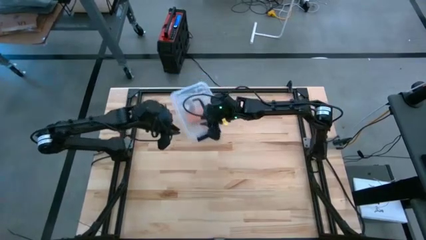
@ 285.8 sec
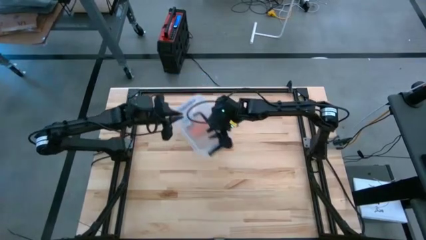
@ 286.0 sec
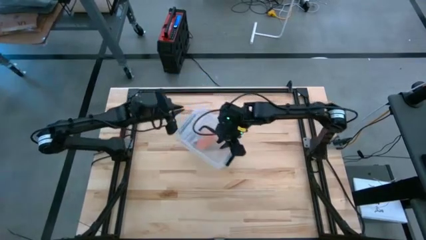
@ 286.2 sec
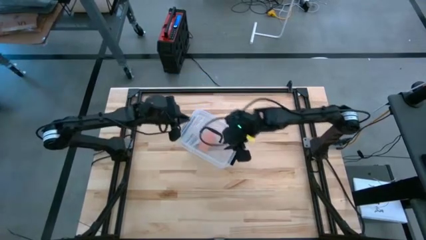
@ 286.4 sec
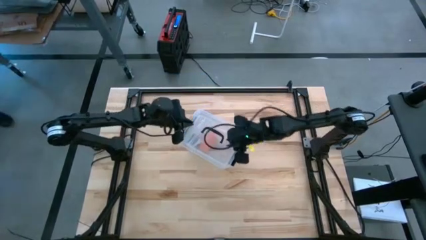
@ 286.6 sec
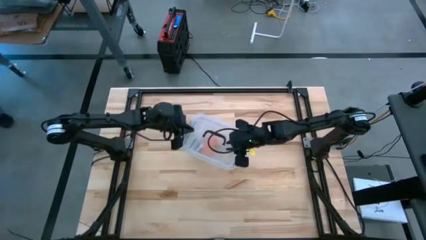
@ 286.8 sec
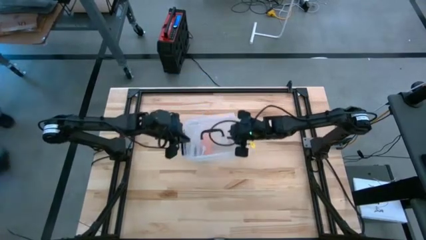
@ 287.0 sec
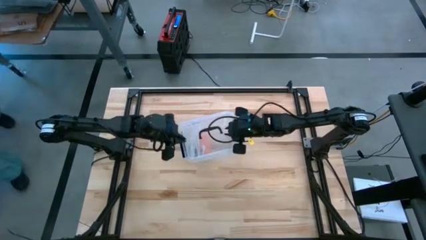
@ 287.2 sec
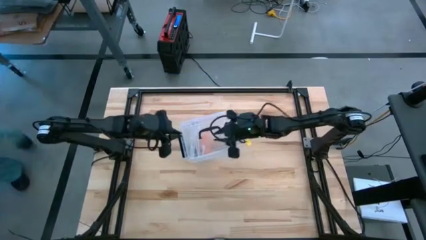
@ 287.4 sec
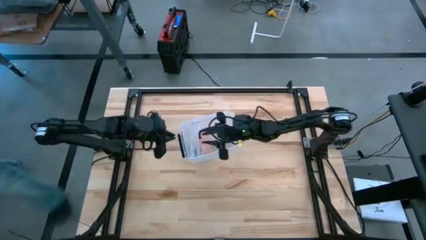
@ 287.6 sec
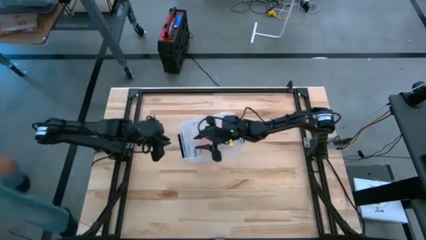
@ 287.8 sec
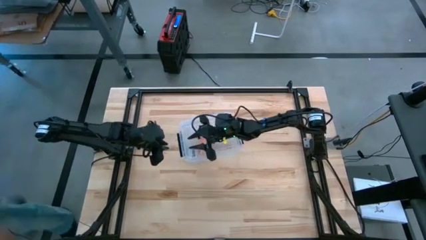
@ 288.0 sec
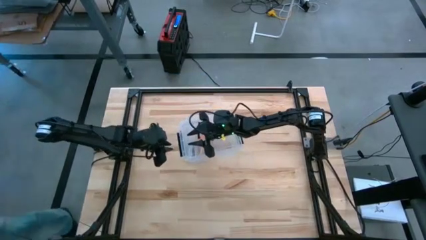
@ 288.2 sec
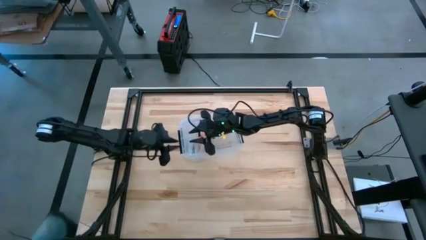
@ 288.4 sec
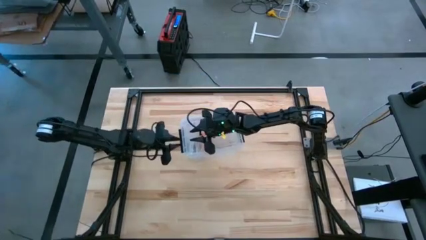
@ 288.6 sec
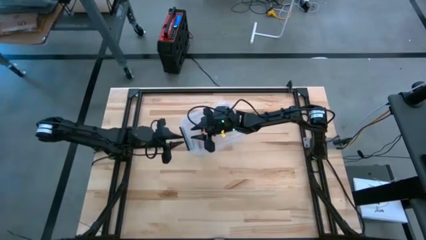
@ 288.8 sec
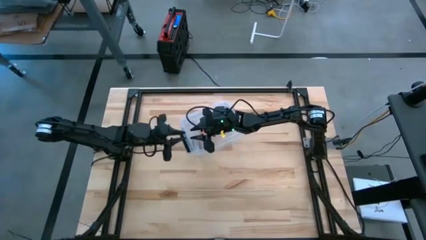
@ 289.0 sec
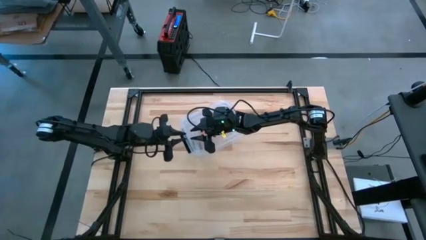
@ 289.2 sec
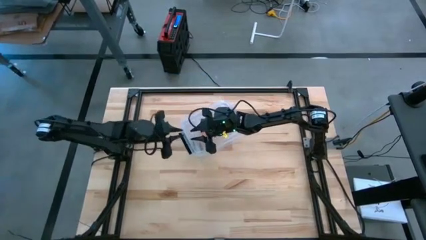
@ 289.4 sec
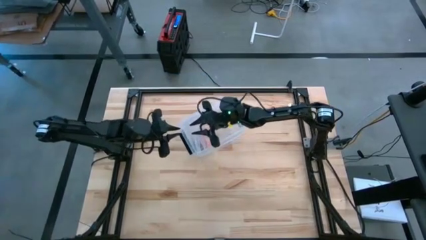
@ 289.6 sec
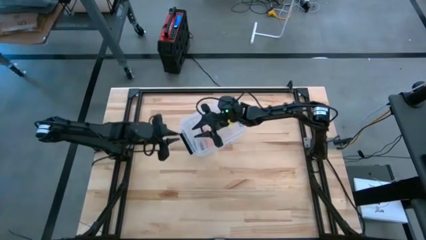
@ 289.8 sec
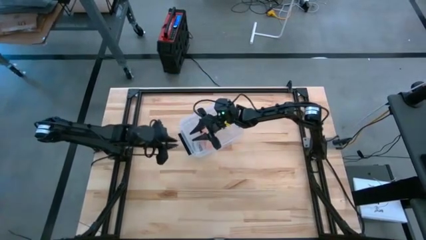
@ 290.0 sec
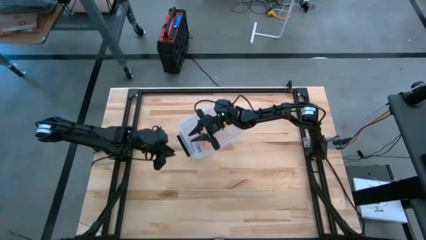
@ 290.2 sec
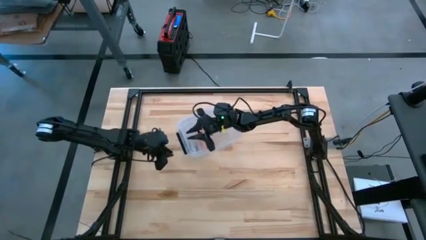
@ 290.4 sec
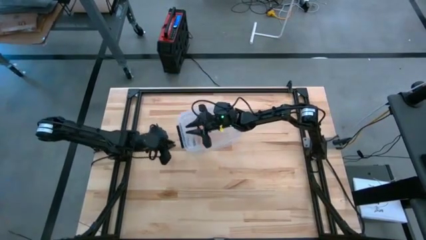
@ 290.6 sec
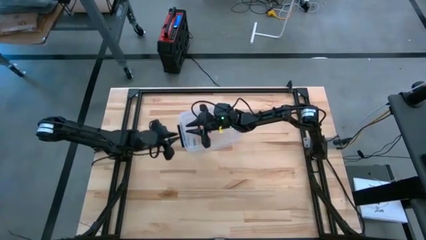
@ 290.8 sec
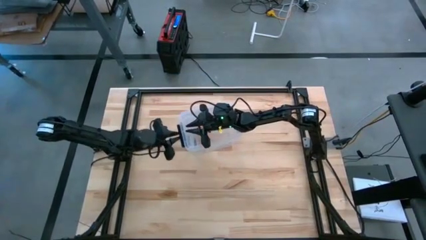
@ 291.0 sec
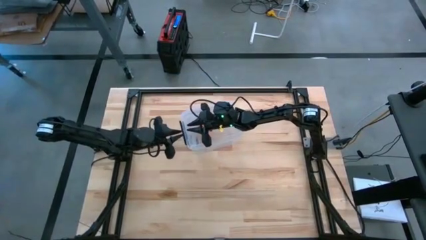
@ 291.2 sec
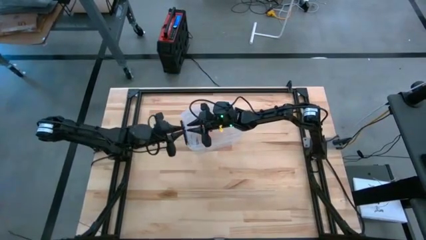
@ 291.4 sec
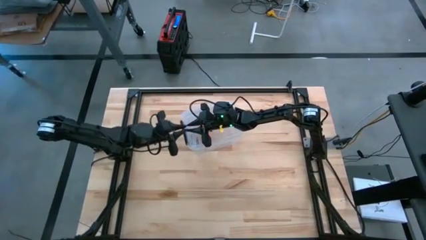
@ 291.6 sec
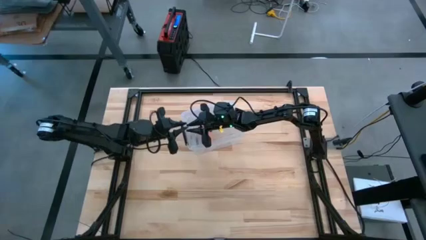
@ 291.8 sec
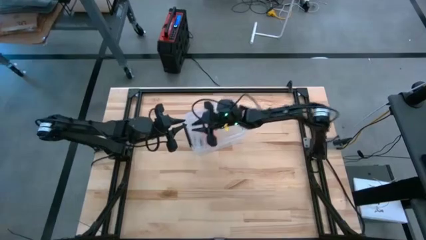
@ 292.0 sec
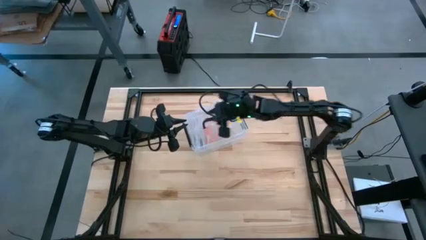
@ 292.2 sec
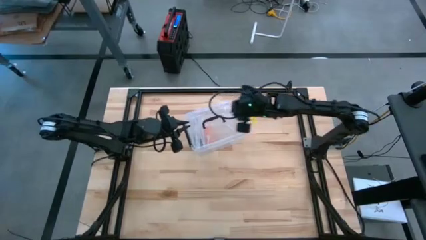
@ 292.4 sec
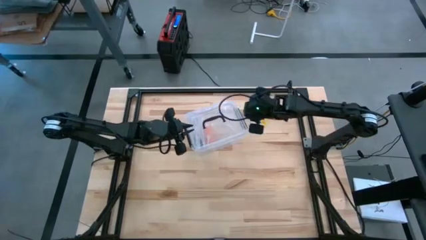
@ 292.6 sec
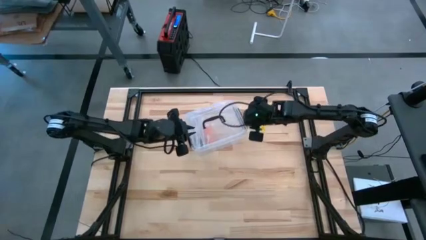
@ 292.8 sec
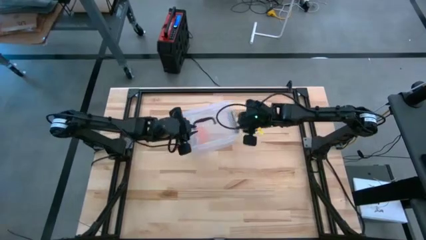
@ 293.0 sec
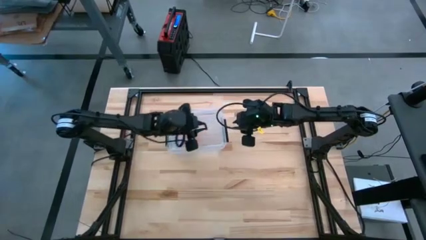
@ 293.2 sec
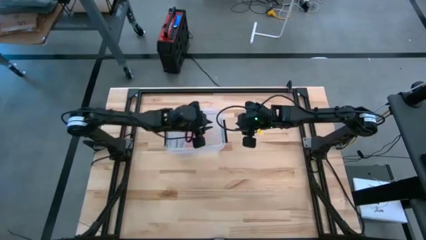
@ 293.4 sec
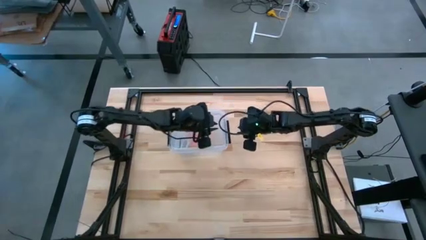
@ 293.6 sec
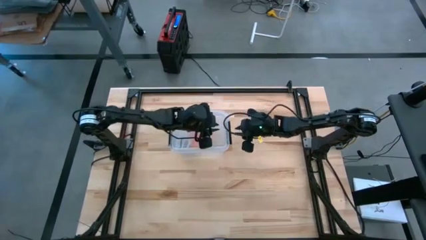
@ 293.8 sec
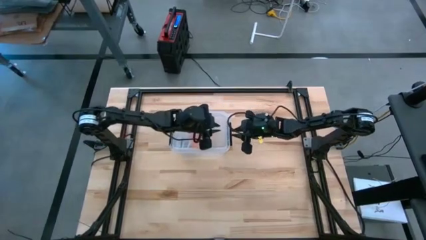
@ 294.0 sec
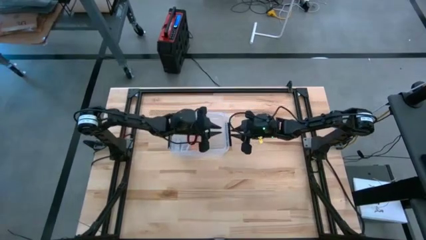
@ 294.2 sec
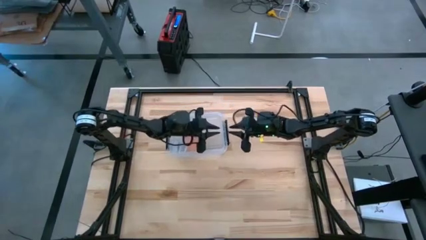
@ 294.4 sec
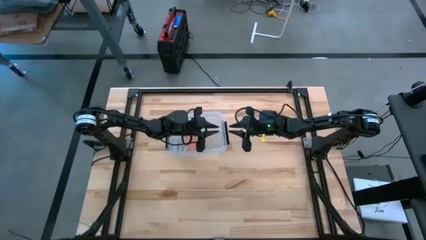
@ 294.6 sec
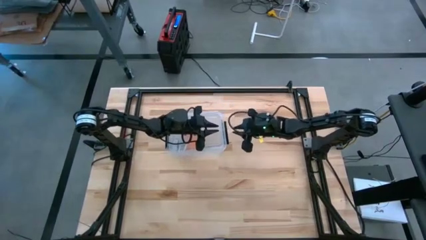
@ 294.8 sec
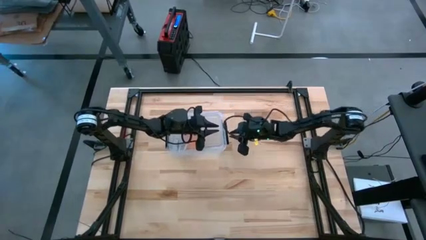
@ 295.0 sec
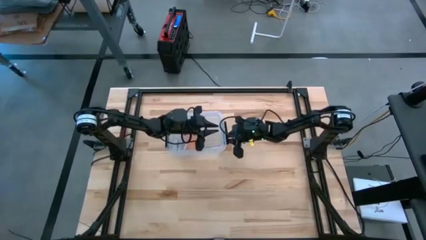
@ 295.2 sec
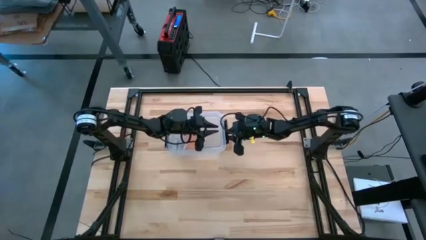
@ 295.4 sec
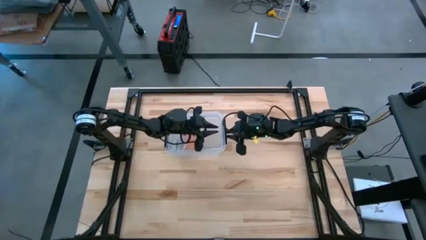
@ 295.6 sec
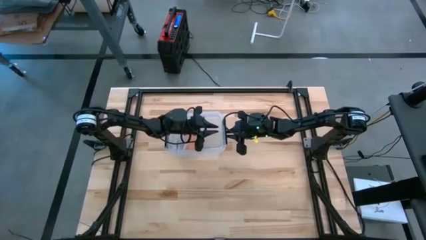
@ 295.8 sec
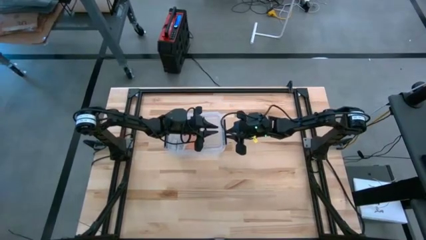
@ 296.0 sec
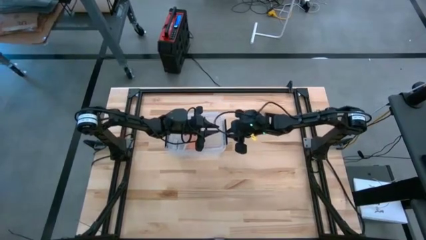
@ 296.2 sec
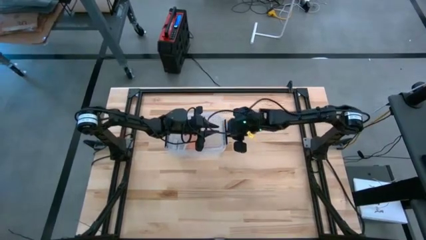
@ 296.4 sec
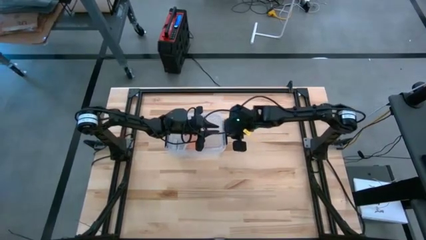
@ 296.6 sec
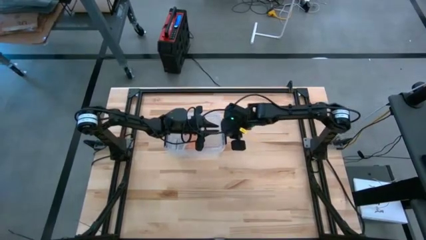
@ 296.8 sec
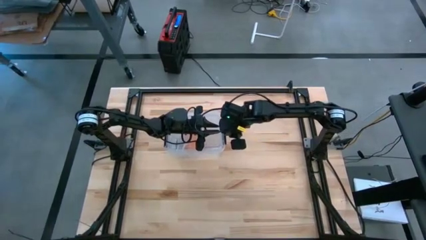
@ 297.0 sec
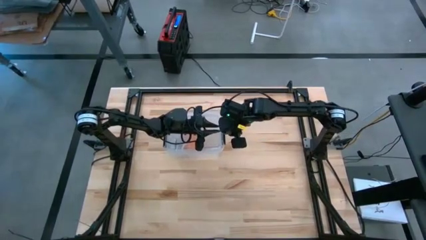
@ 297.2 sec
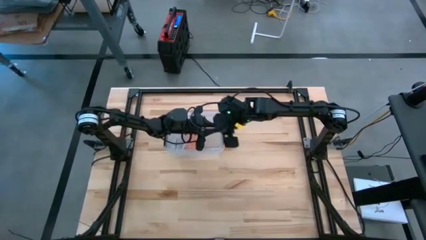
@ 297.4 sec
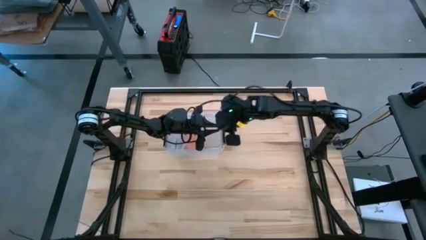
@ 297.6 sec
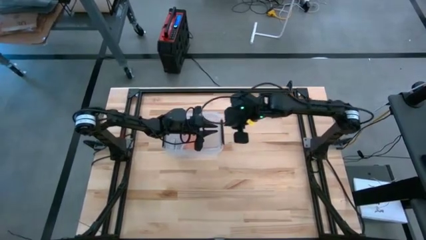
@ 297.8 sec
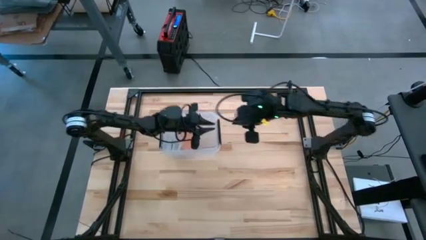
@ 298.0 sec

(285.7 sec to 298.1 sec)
Task: Roll bandage
Close the transparent container

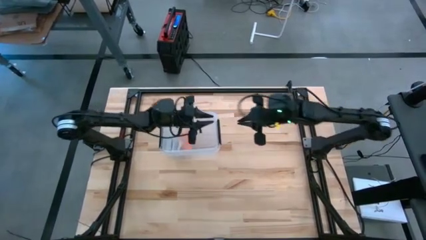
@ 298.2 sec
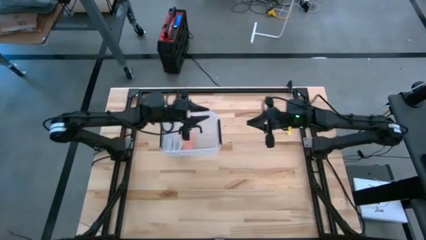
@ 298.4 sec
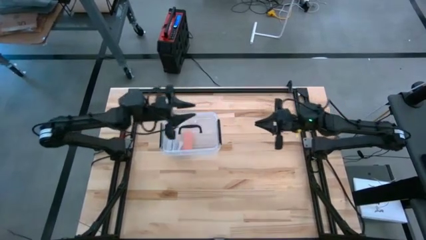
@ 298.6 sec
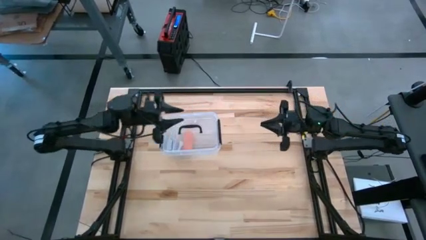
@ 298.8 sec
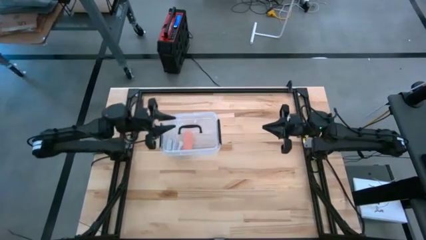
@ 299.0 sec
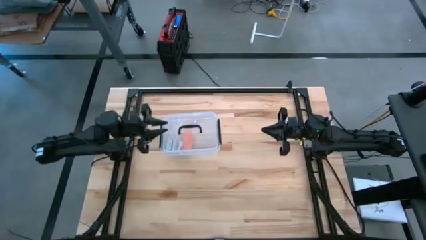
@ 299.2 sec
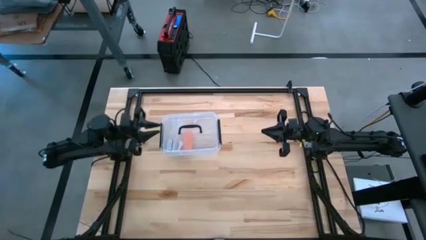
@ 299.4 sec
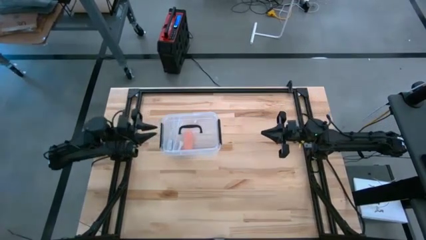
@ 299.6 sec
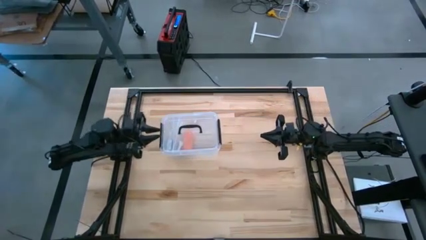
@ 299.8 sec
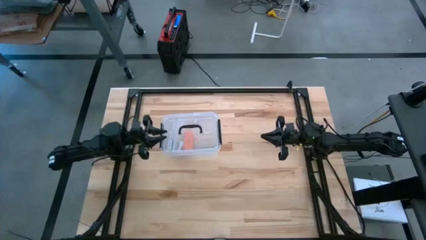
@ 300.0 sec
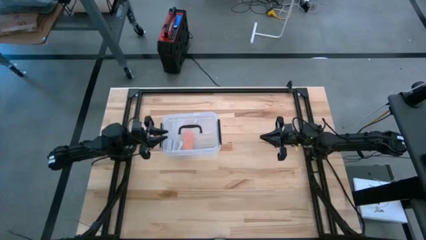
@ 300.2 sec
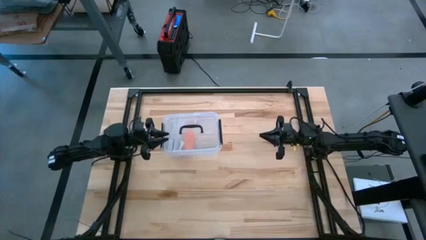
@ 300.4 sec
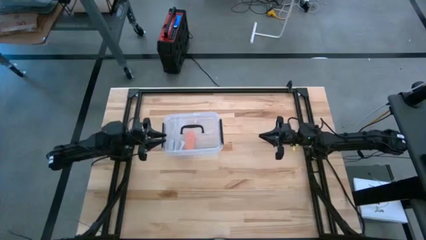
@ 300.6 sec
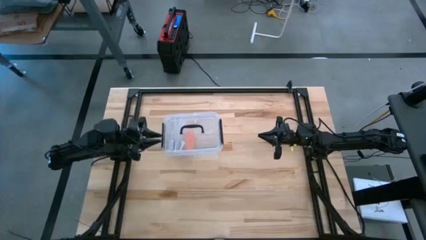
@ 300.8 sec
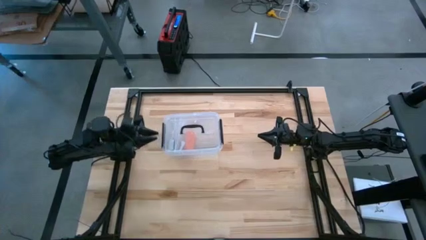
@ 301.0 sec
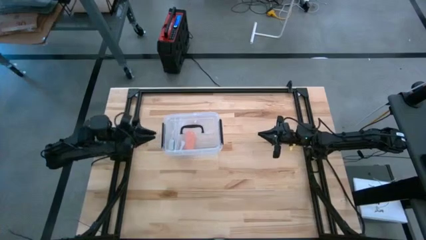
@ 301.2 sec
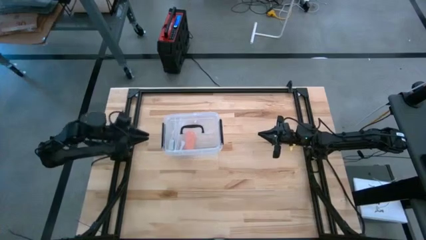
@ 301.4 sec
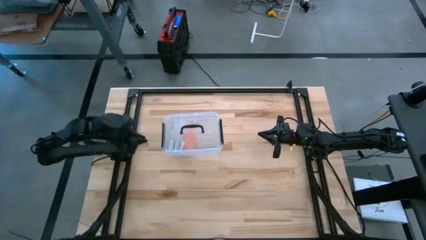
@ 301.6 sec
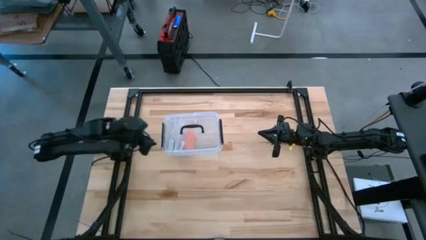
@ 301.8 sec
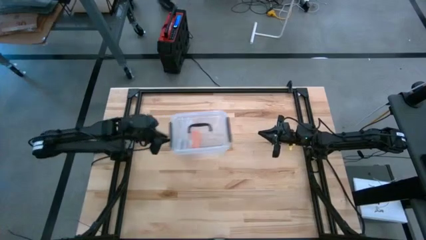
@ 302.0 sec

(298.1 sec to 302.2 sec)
Move the transparent container to the center of the table
